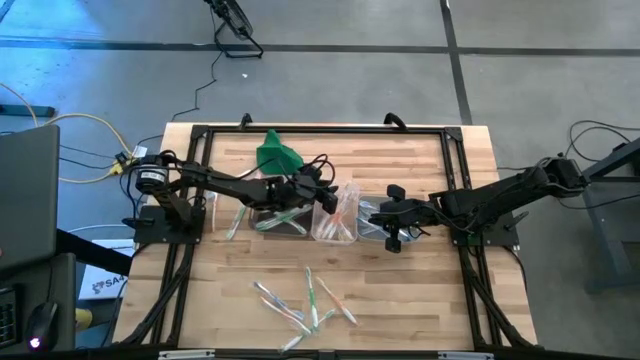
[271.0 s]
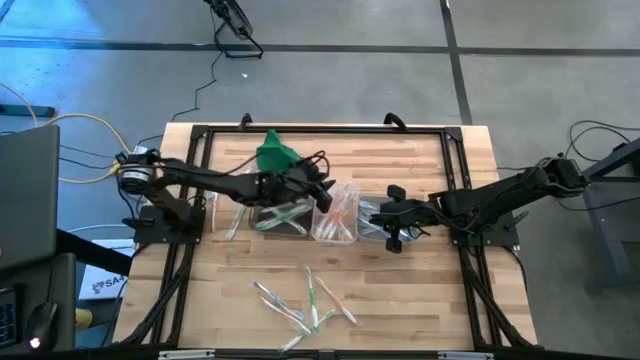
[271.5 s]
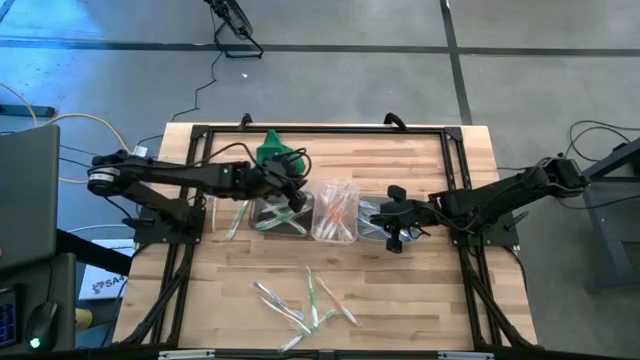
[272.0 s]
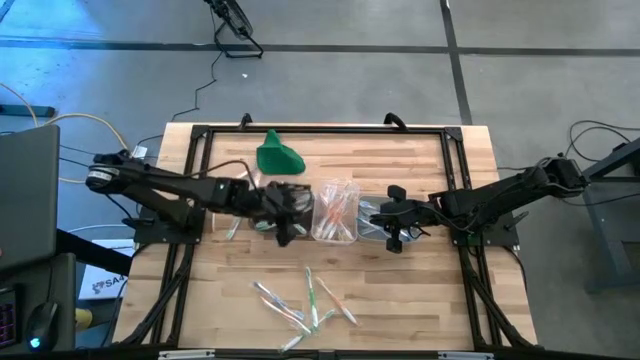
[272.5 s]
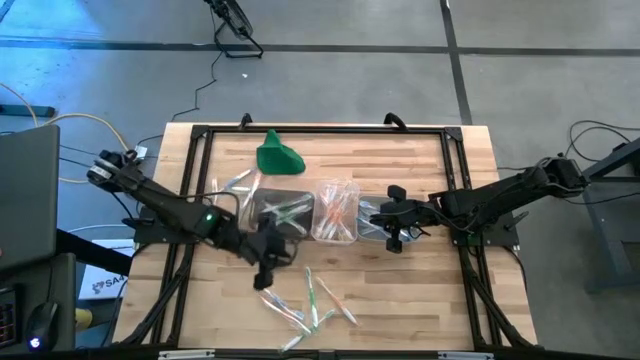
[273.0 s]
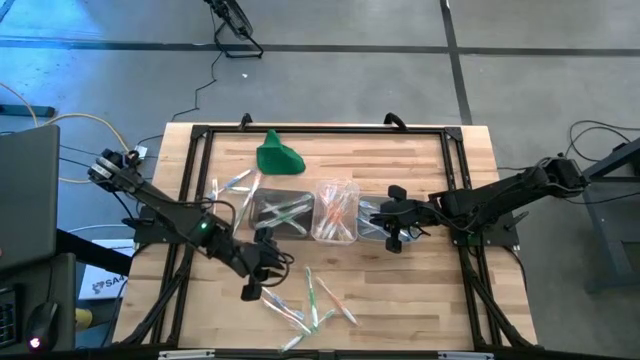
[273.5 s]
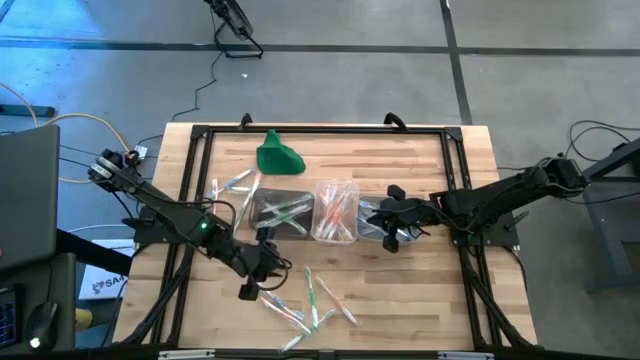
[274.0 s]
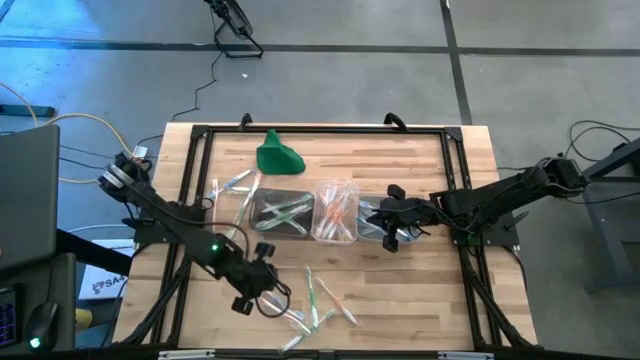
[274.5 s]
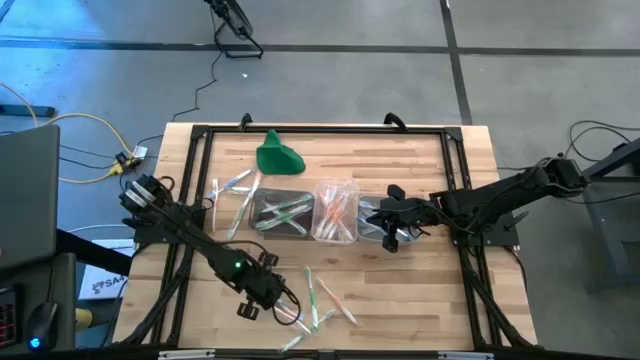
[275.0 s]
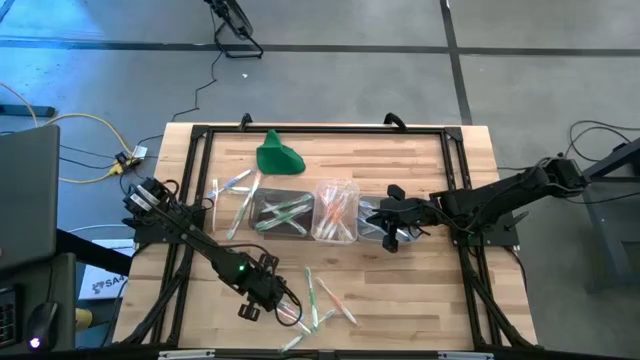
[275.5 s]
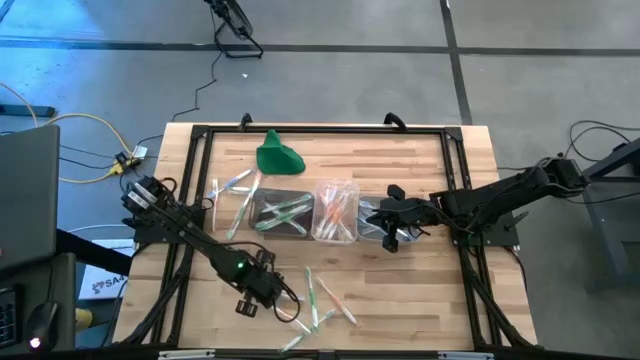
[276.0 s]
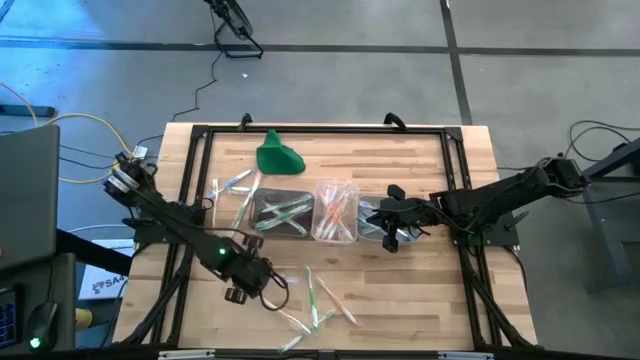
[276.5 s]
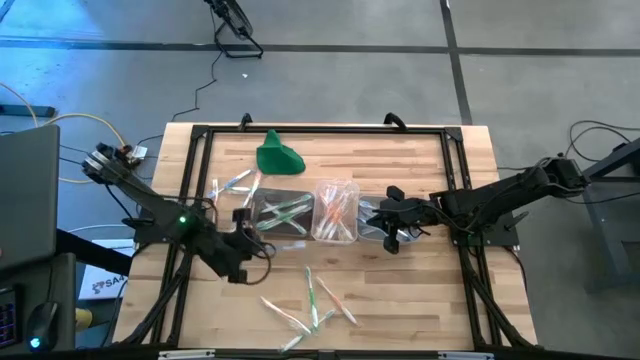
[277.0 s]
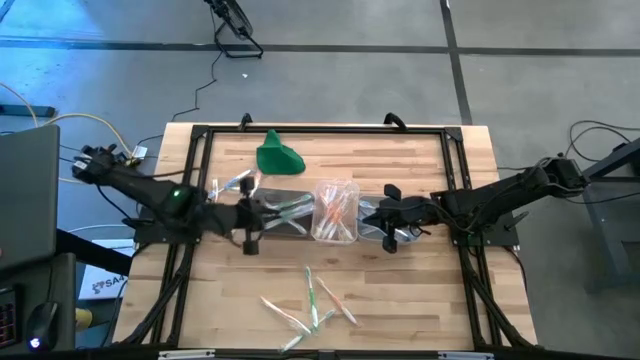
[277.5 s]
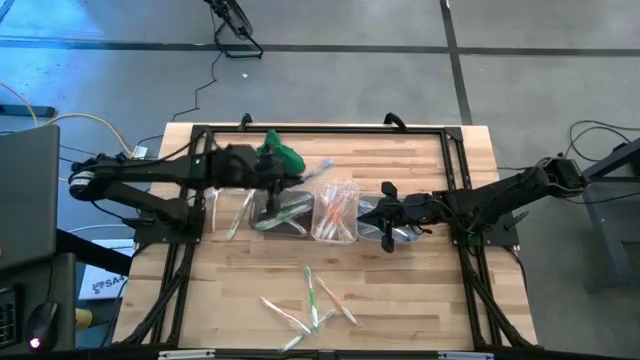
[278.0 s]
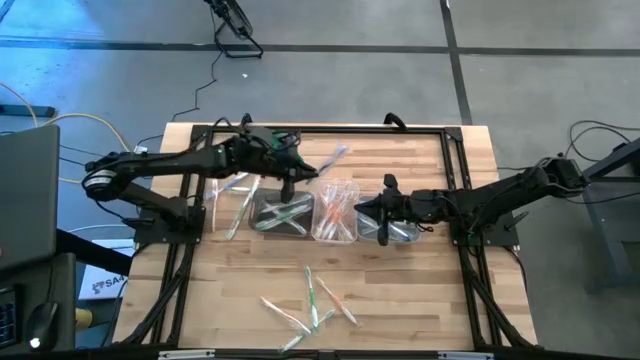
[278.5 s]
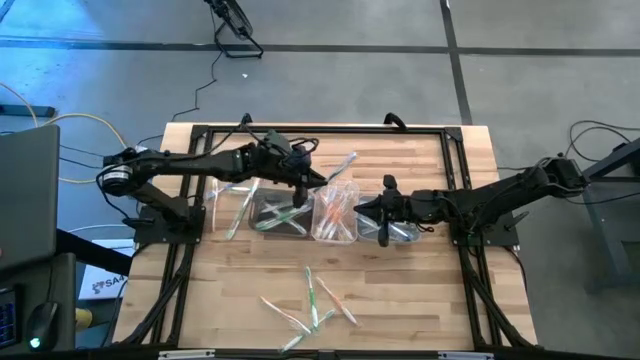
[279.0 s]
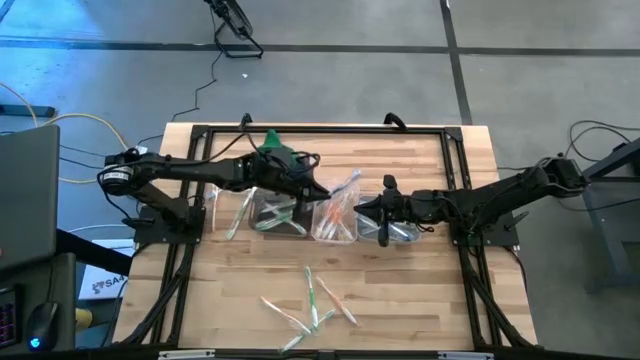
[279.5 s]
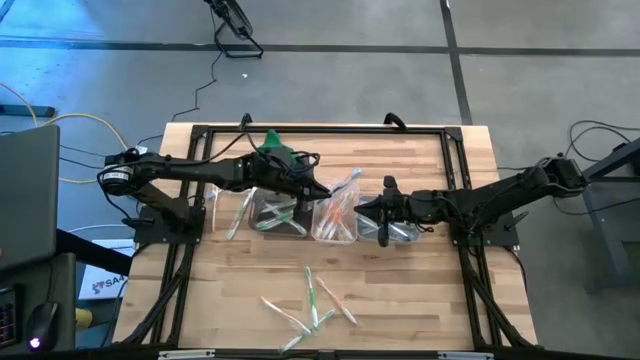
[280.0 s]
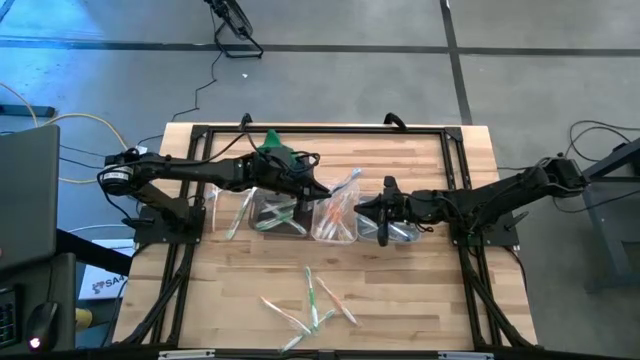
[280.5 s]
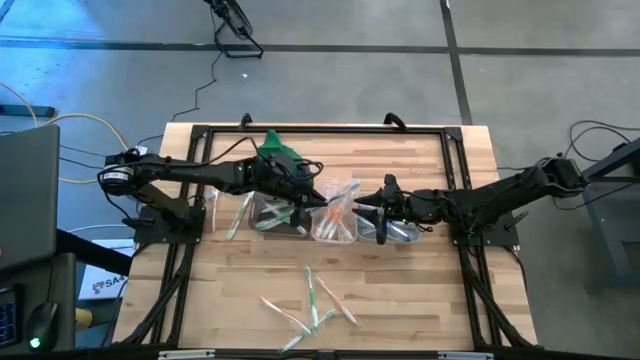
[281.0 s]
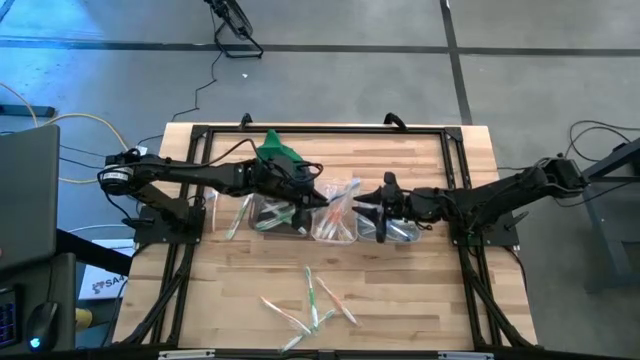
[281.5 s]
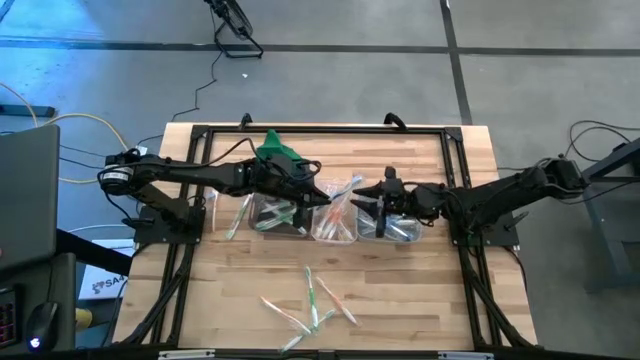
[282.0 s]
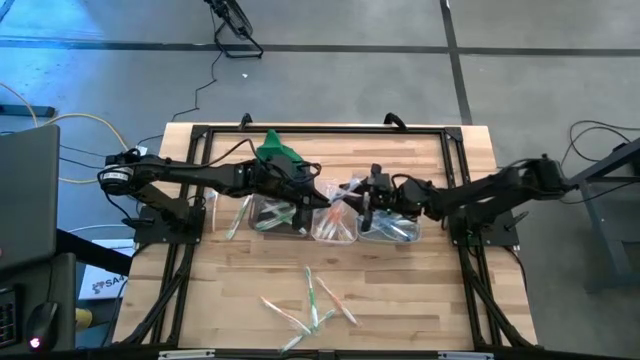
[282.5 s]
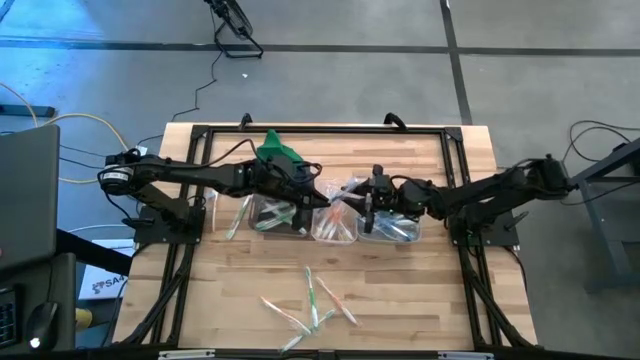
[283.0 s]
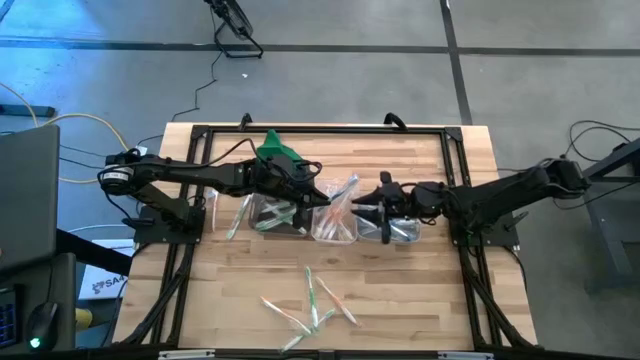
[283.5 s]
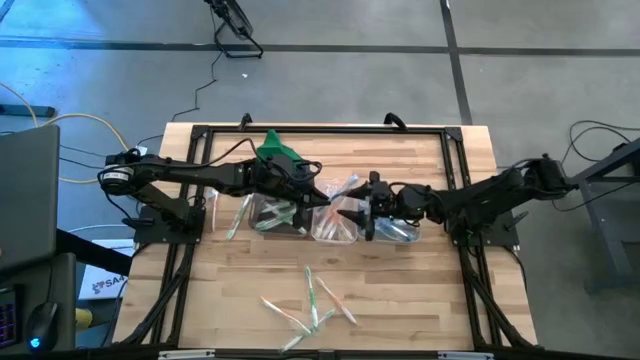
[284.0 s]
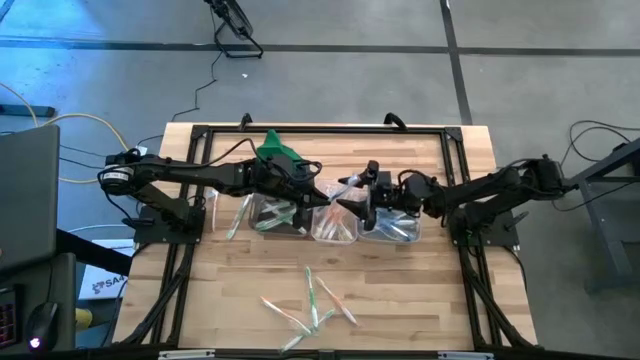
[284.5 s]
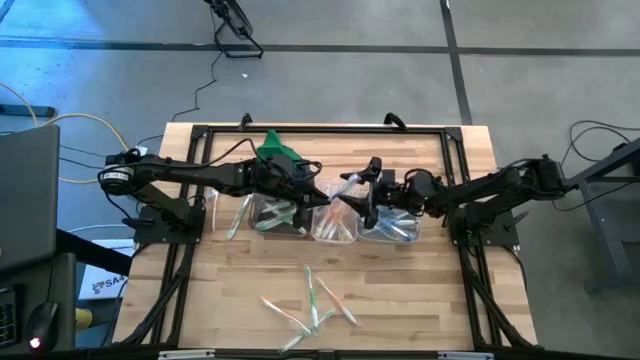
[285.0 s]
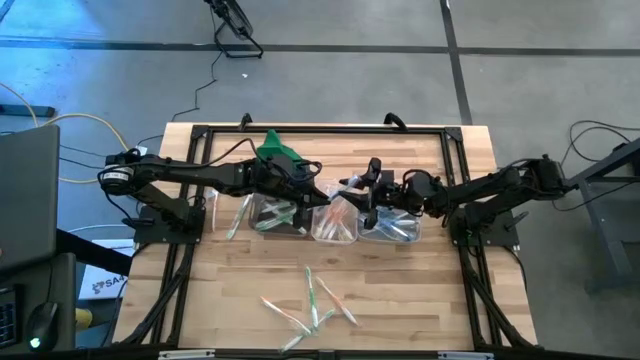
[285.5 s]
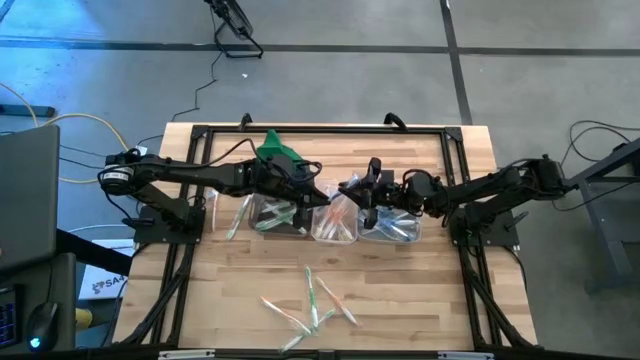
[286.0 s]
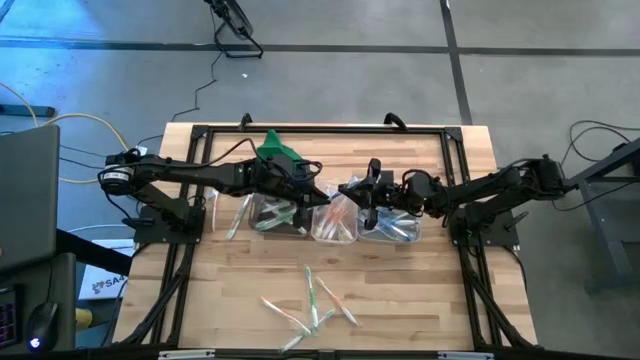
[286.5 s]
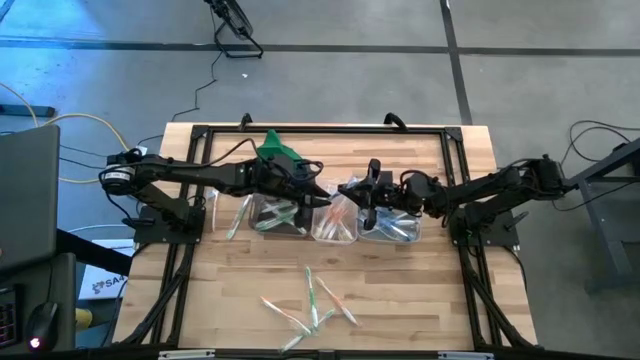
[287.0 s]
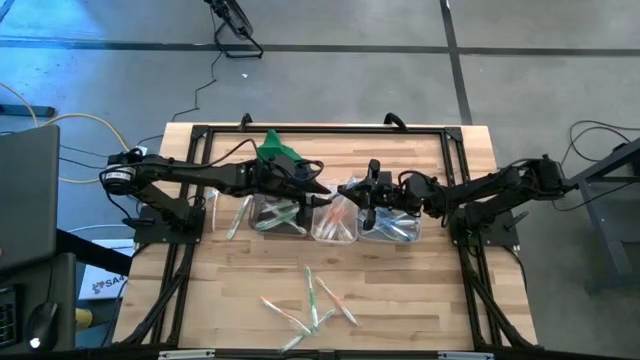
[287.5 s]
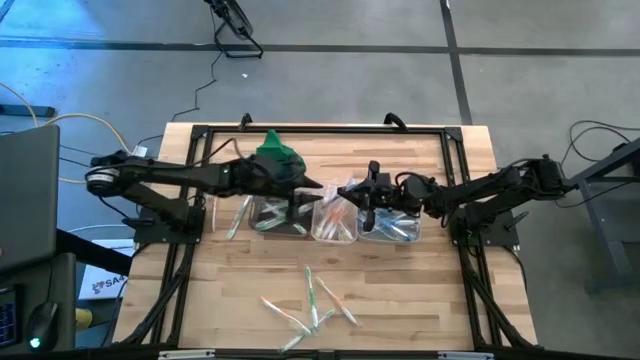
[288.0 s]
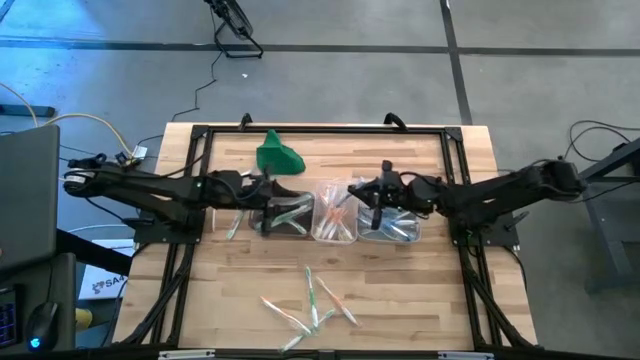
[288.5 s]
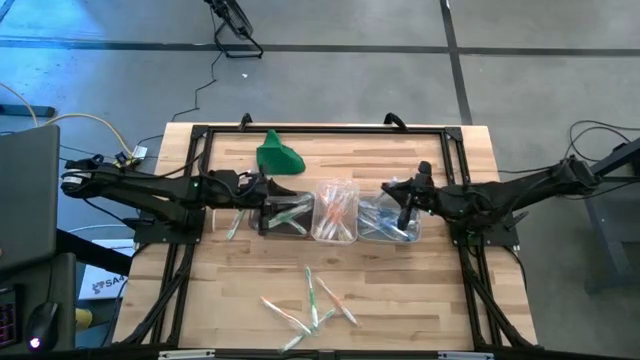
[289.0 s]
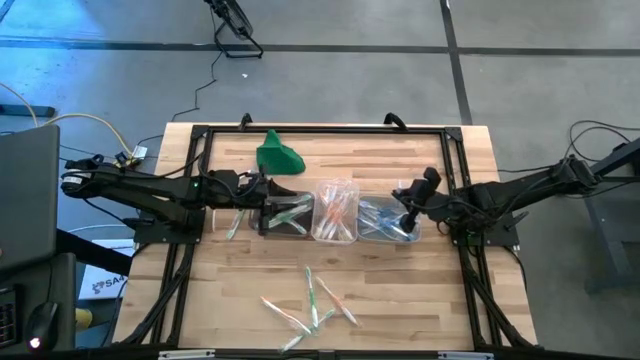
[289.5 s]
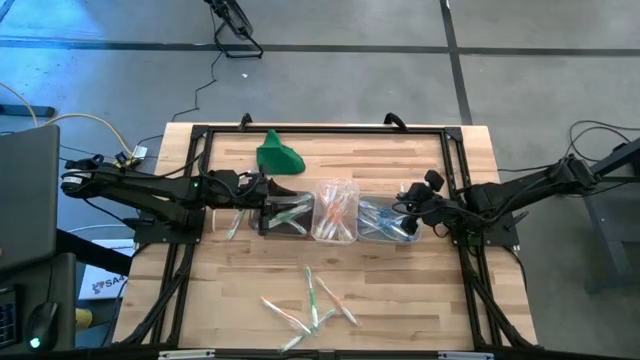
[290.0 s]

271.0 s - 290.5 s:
Task: Pick & Place Toothbrushes
Put the blue toothbrush into the gray bin
